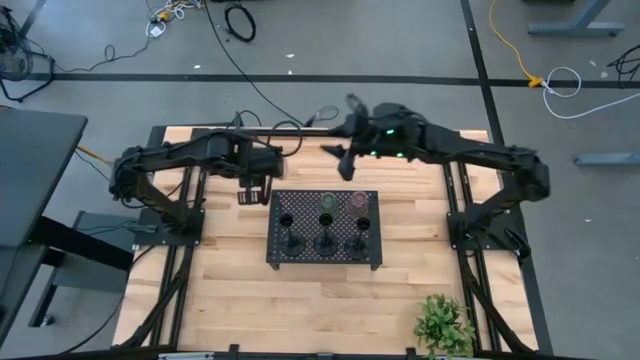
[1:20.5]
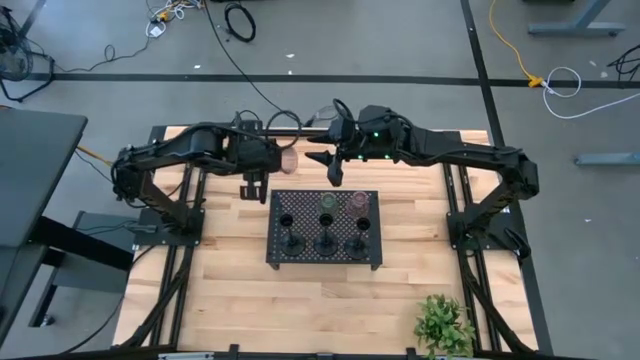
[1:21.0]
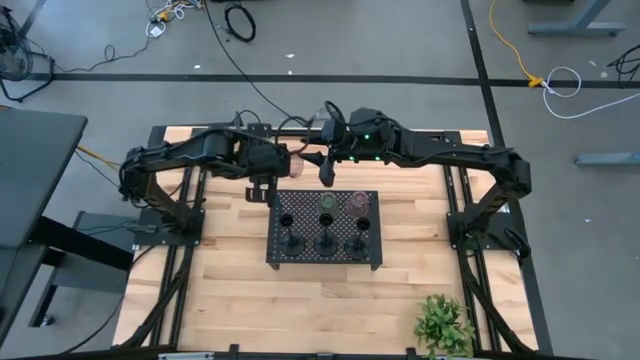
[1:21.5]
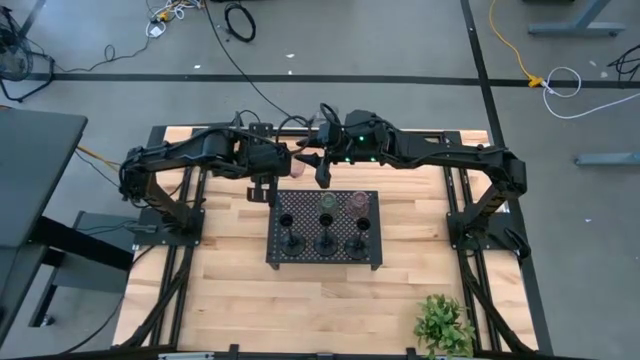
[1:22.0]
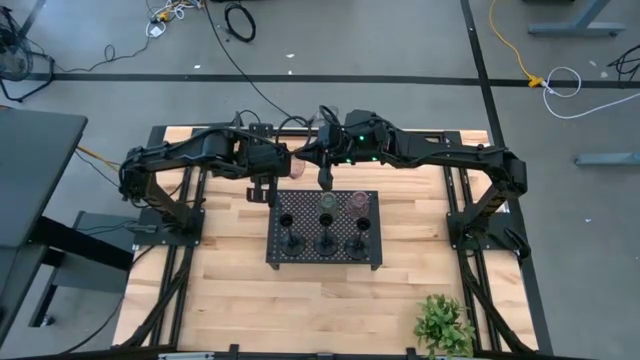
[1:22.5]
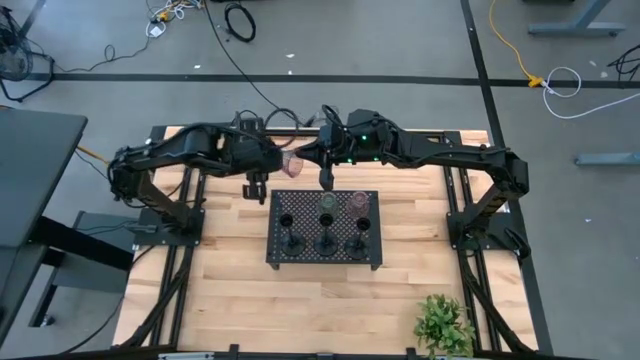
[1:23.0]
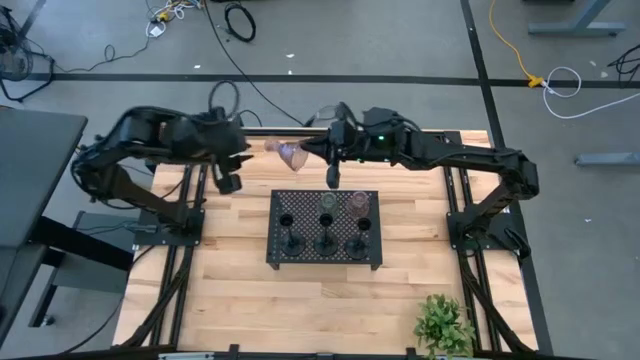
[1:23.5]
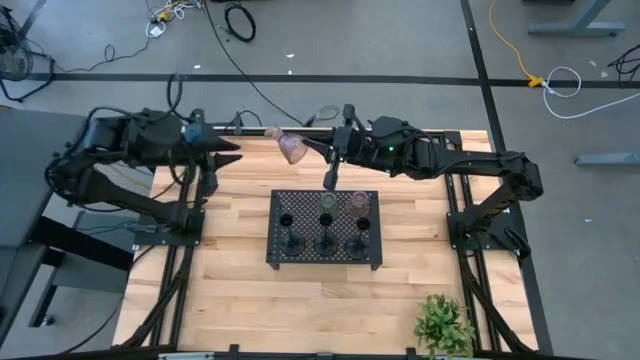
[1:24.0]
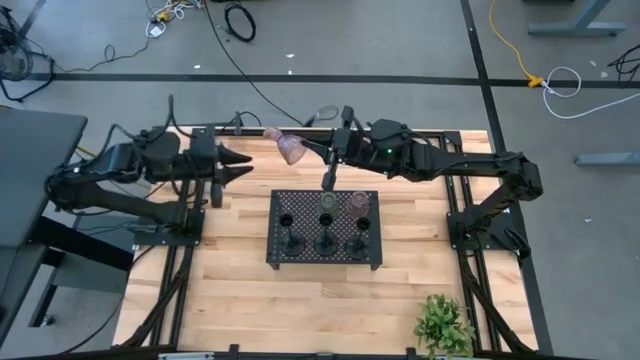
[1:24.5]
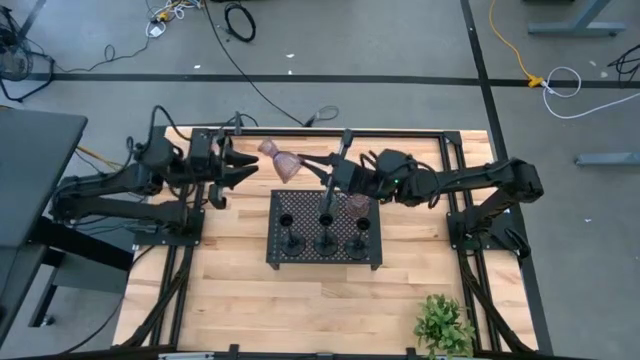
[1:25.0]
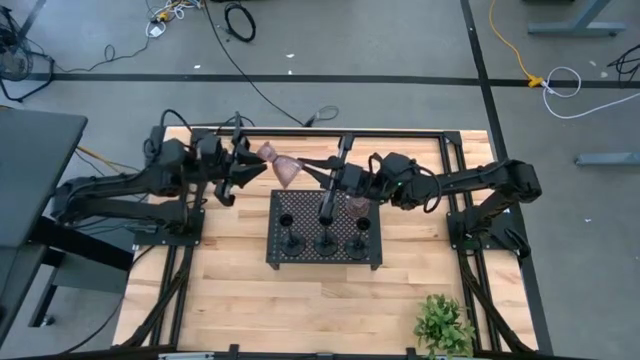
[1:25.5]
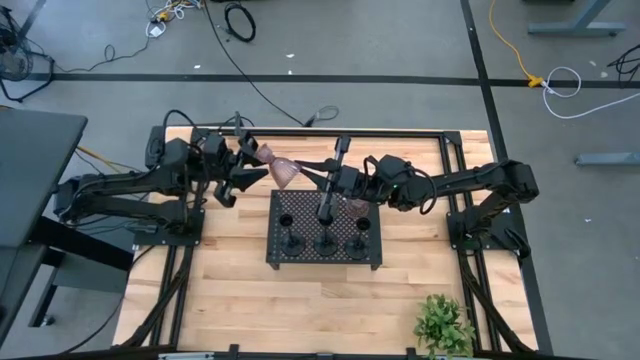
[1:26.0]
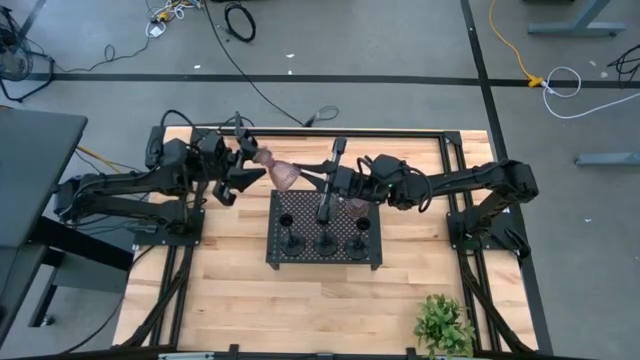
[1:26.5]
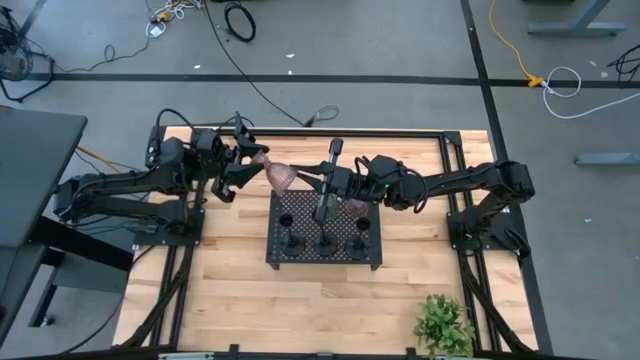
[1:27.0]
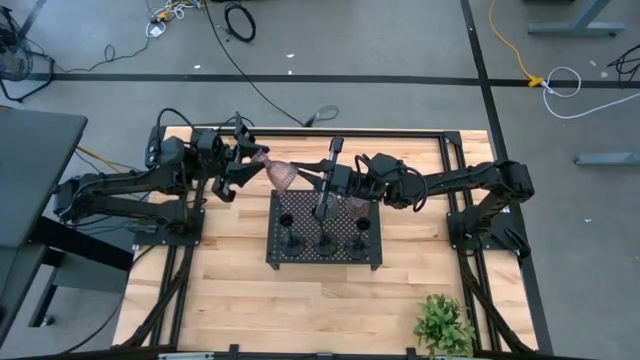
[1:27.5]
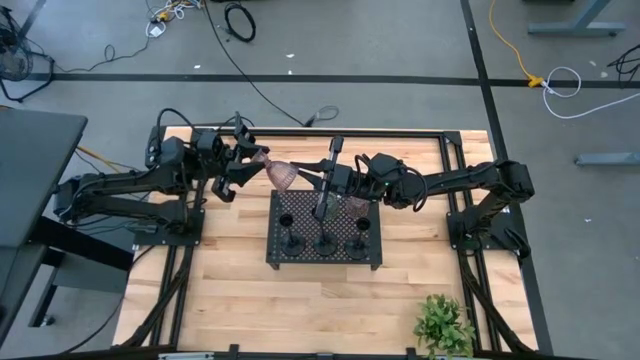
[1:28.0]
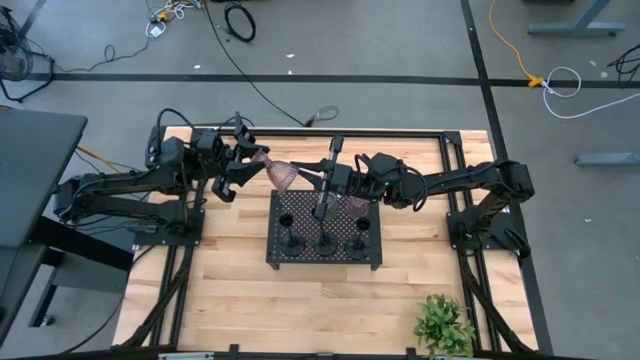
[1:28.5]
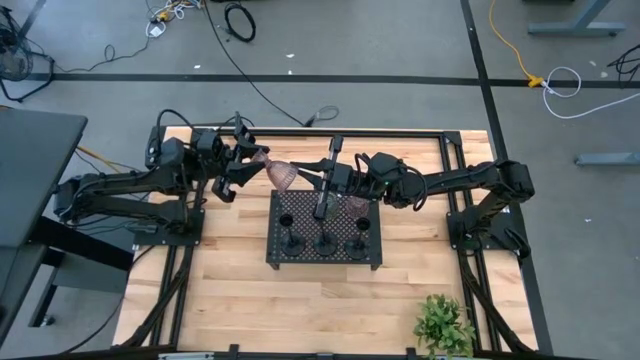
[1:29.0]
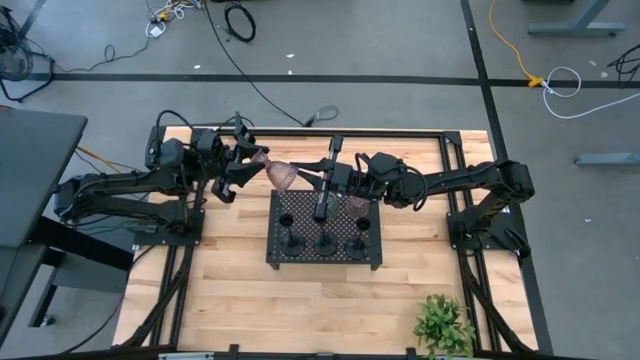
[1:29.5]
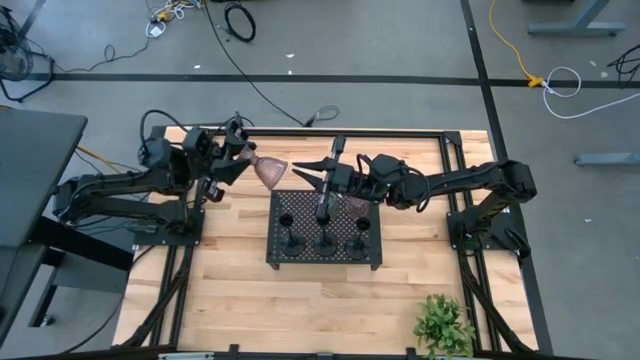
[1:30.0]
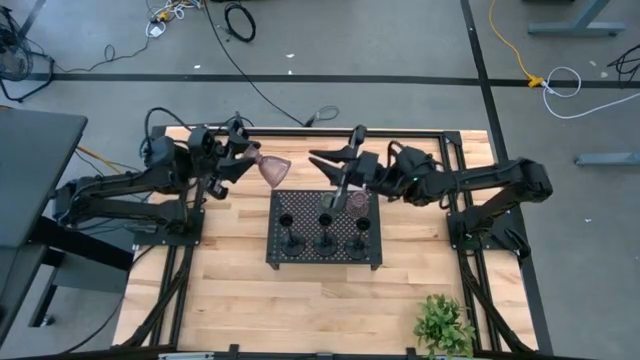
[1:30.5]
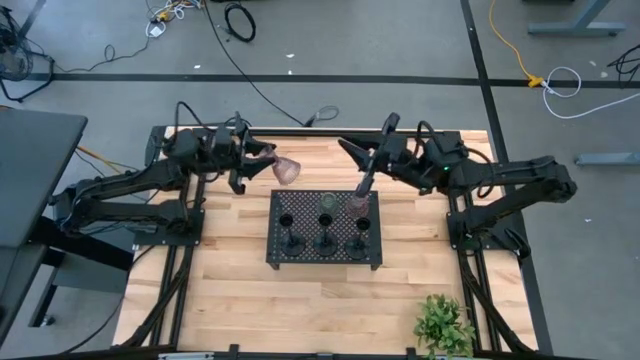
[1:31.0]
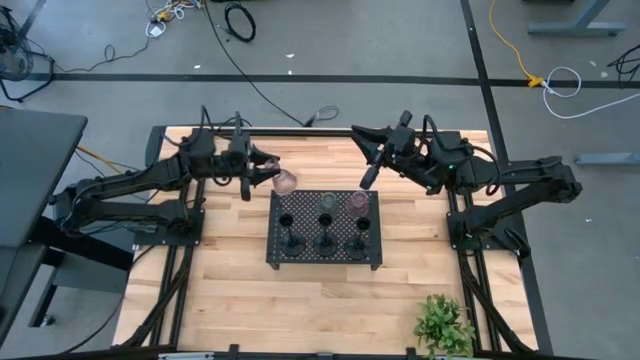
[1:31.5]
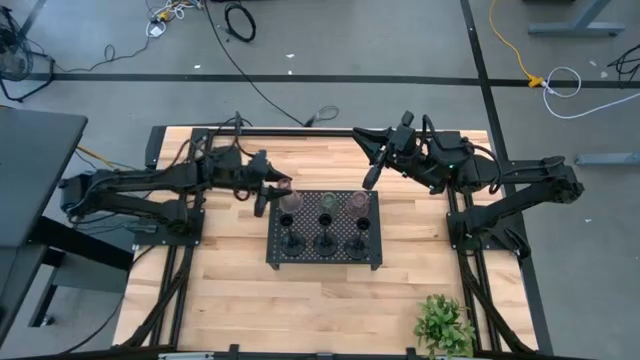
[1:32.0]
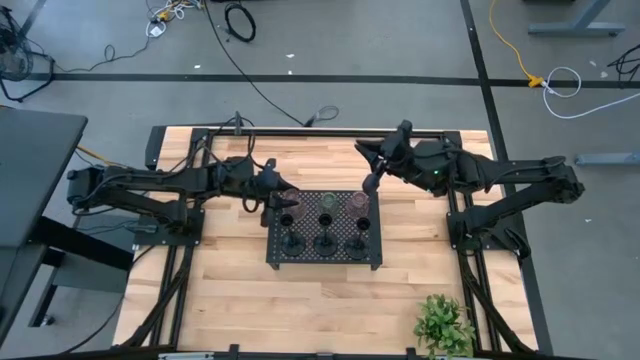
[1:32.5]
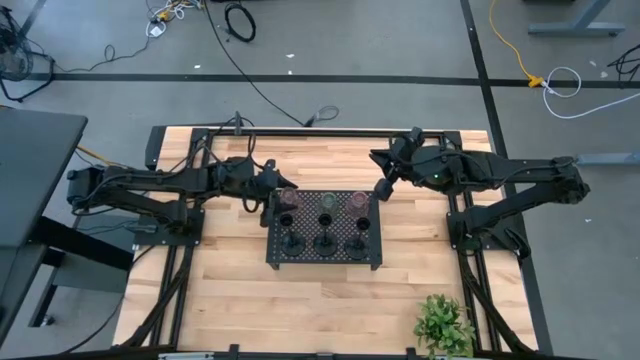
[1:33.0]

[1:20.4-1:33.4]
Task: Pick & Place candle stick holders
Put the pink candle holder on the shelf aligned with the candle holders

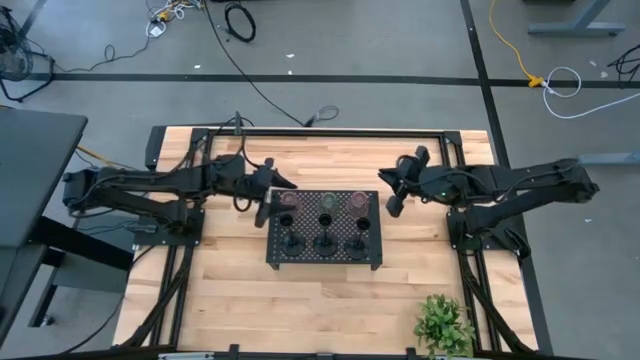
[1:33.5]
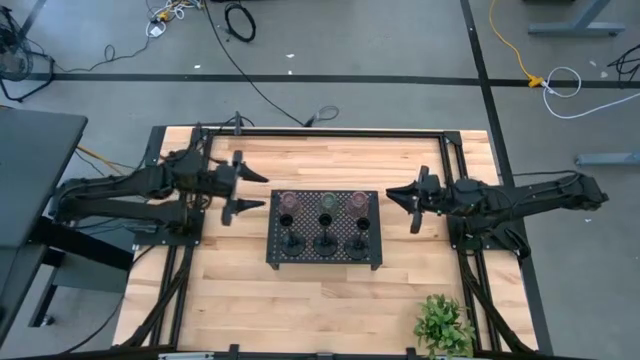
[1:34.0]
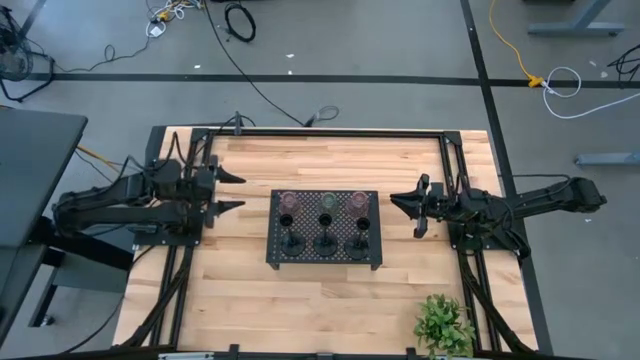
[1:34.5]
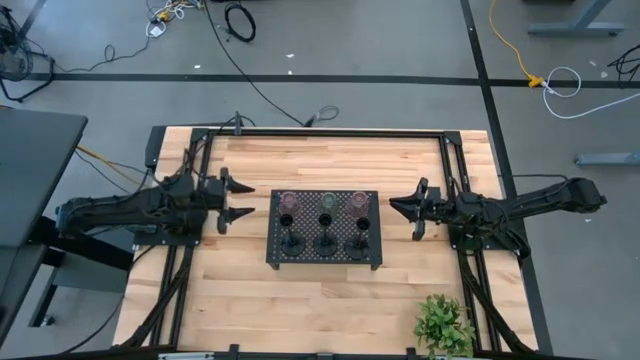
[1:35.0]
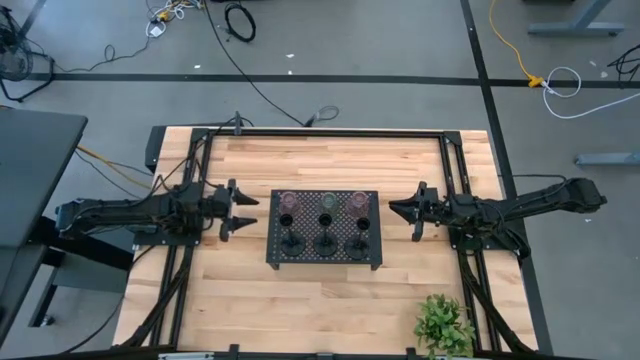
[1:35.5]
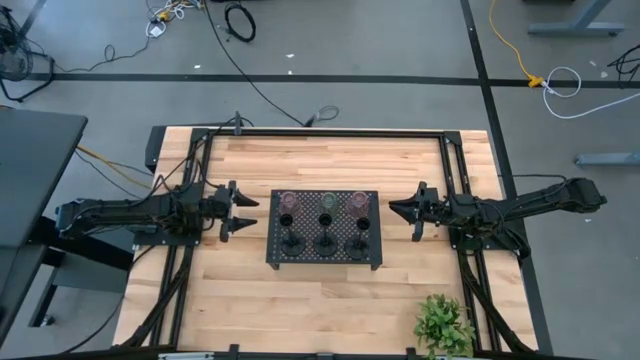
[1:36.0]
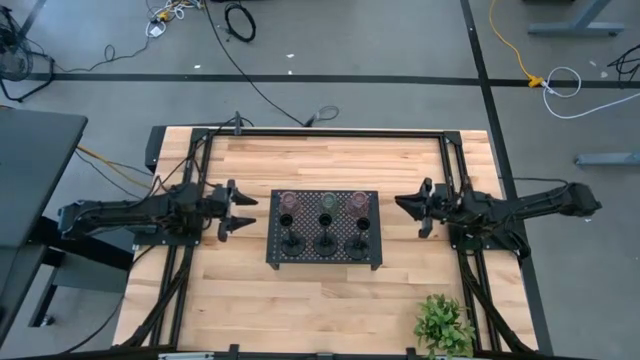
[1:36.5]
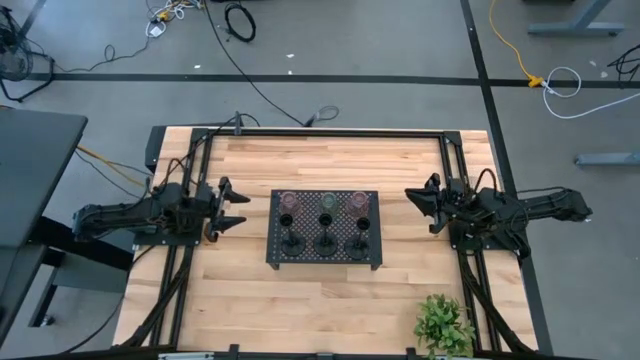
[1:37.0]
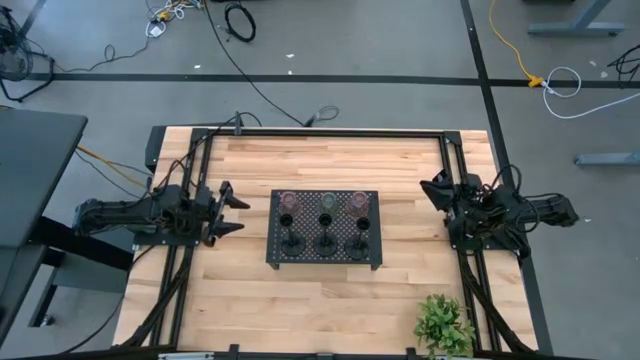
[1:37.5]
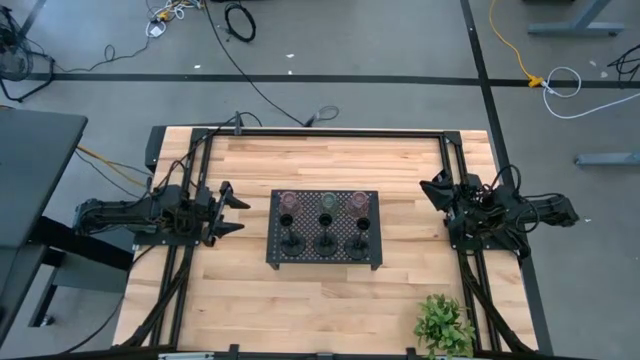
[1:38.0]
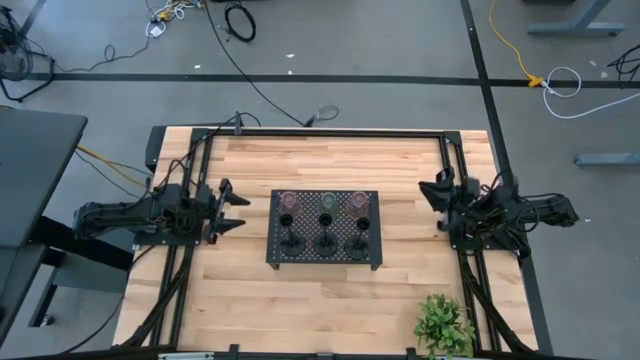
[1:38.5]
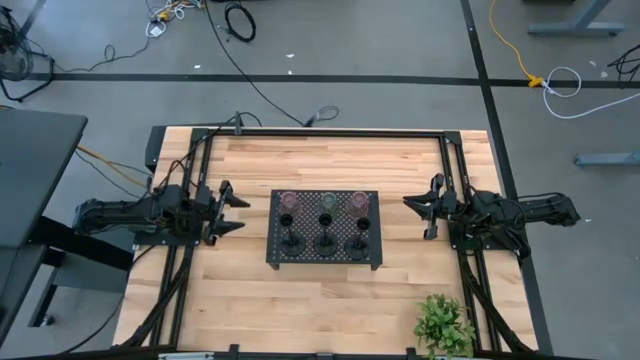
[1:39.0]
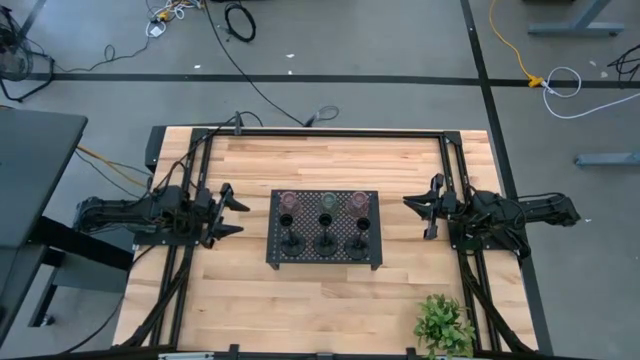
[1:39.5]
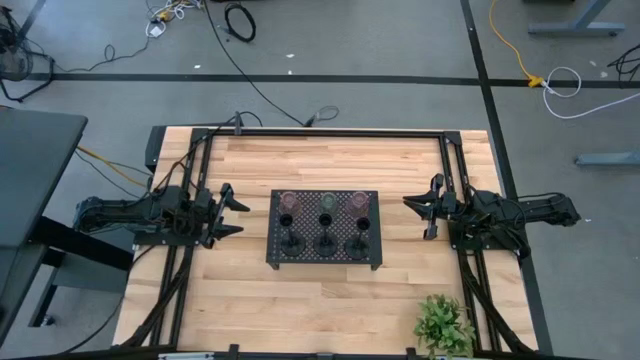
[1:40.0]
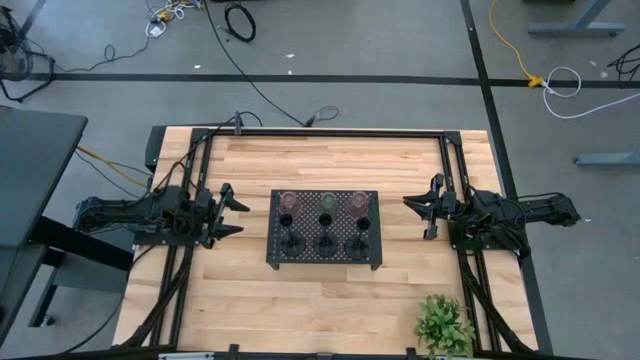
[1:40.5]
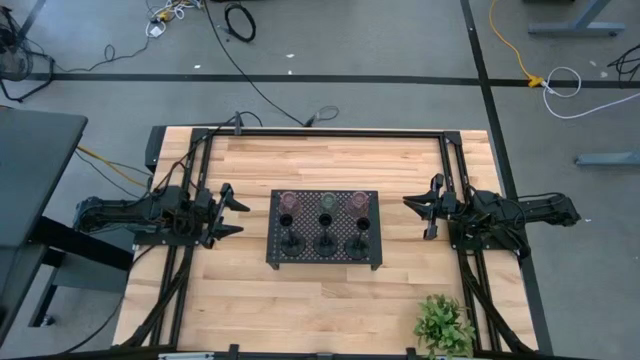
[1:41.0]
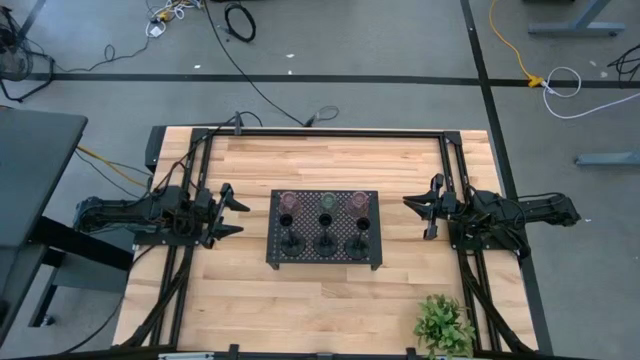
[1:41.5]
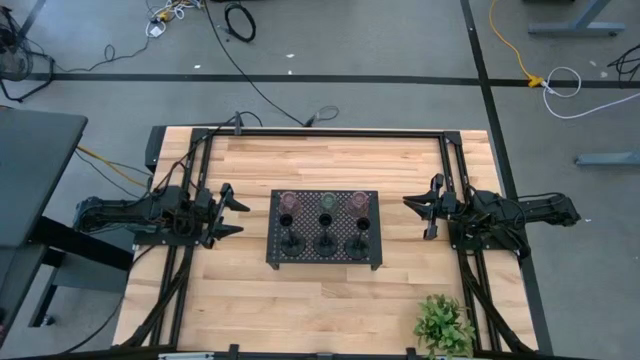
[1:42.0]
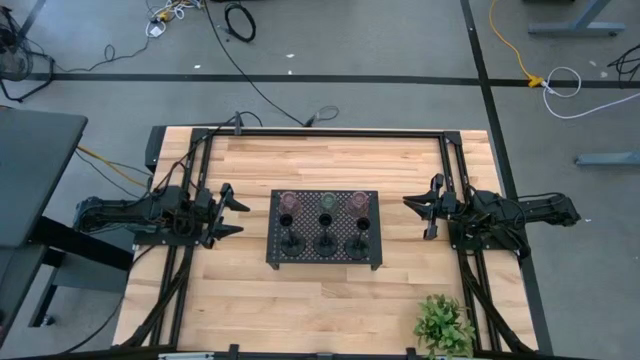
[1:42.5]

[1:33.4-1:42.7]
Return to Home Position
